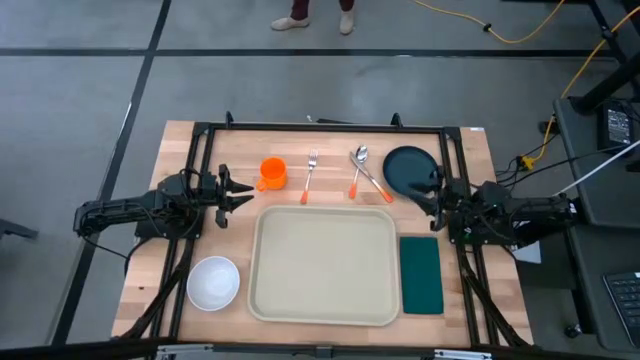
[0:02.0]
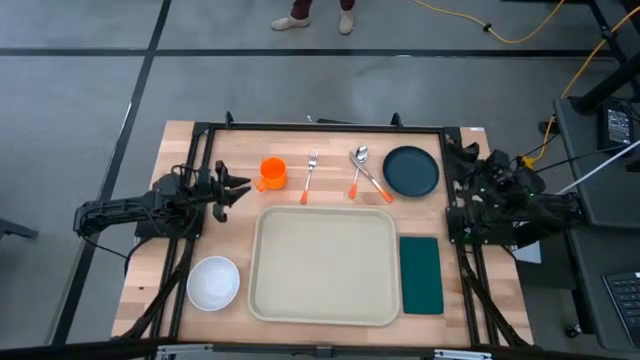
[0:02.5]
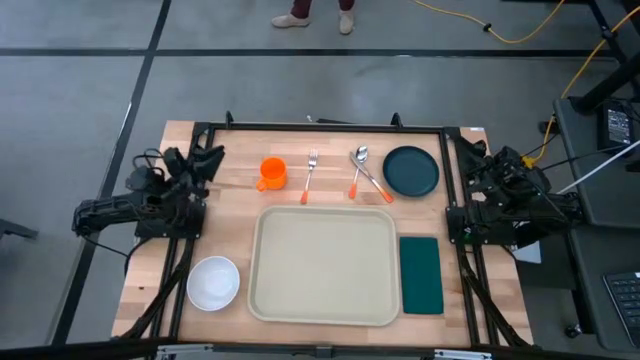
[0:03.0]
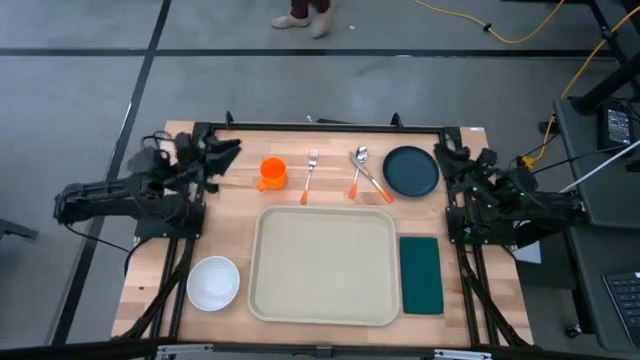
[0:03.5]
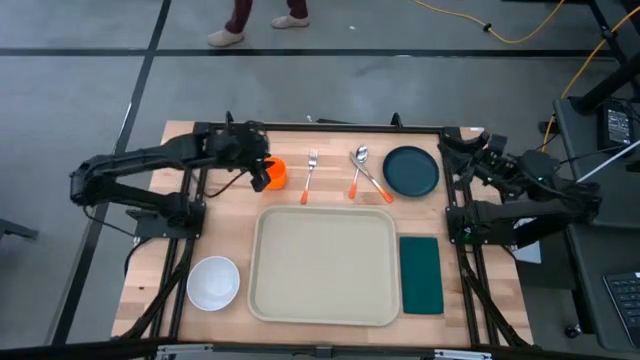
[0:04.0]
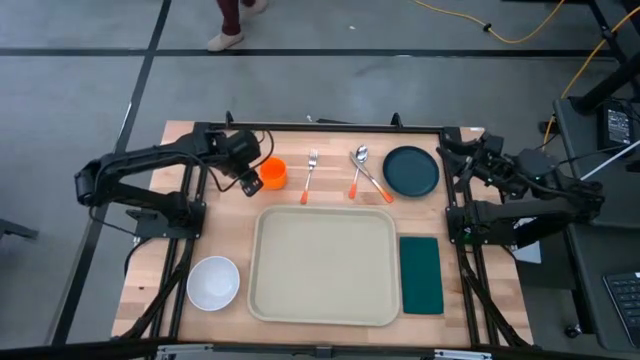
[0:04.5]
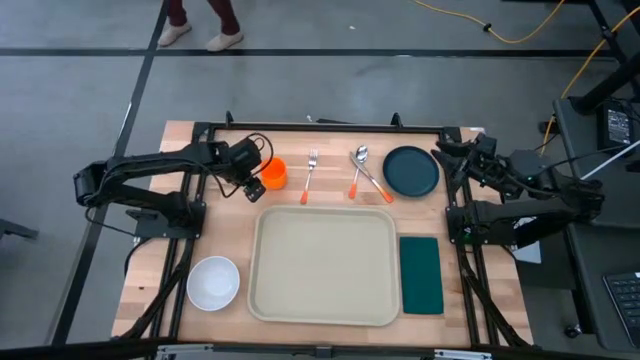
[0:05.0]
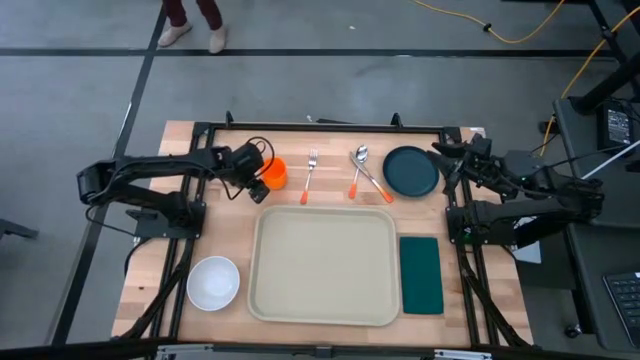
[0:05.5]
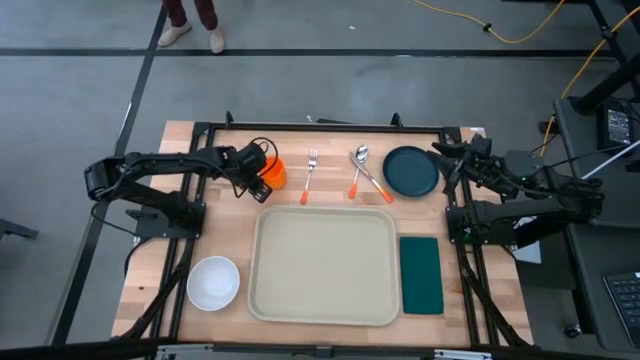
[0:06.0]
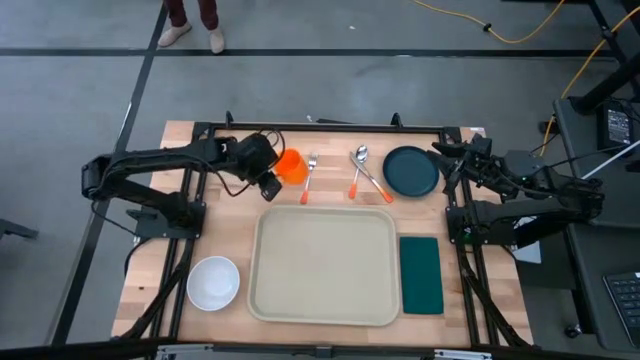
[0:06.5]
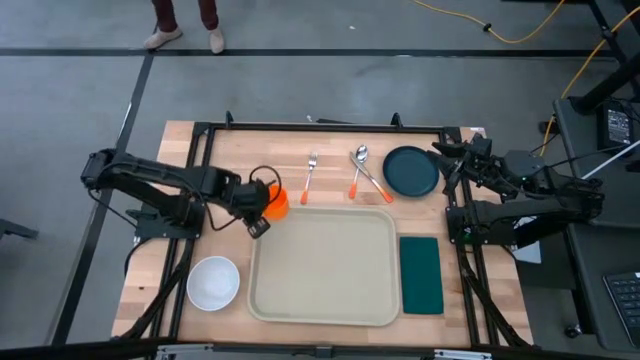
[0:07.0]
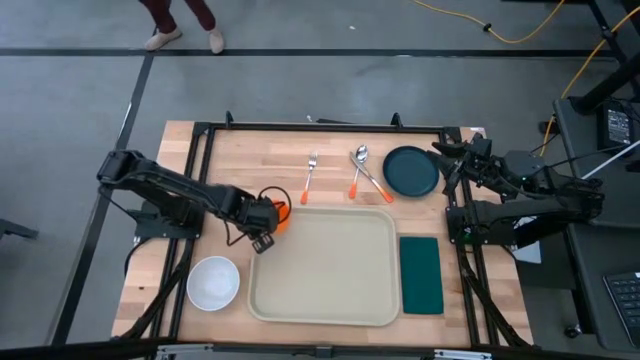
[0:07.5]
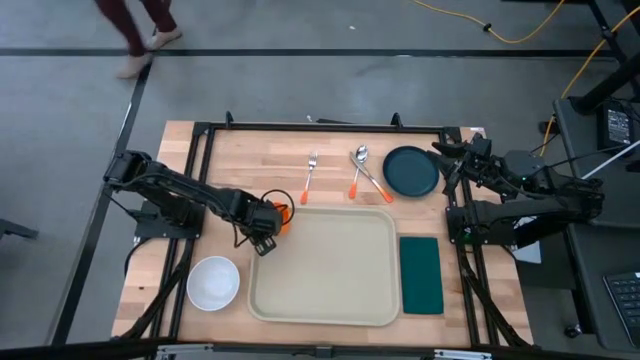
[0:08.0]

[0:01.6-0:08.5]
Task: Set up tray
Put the orange mug on the top left of the brown tray

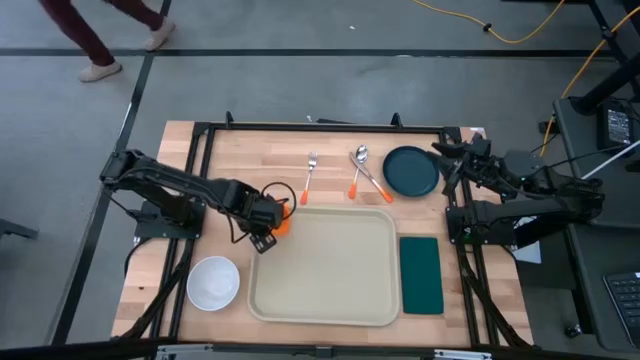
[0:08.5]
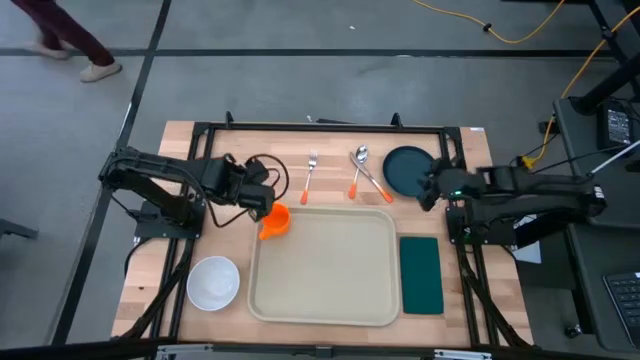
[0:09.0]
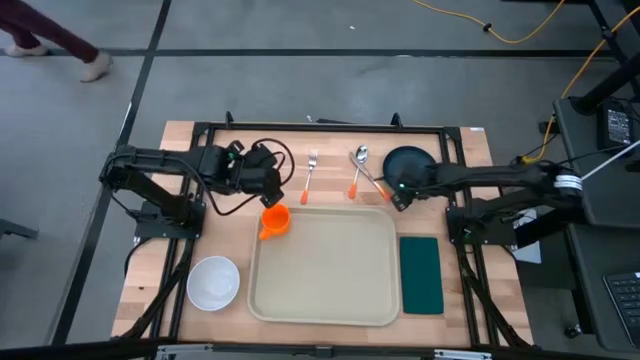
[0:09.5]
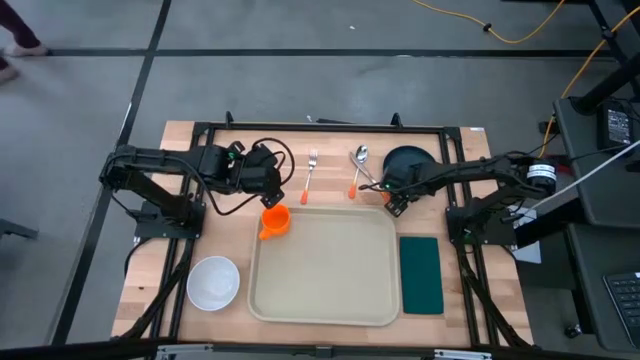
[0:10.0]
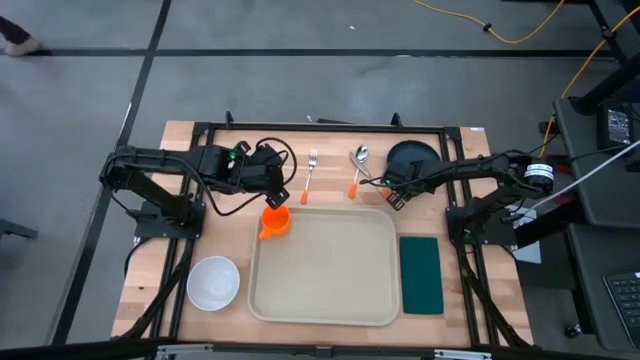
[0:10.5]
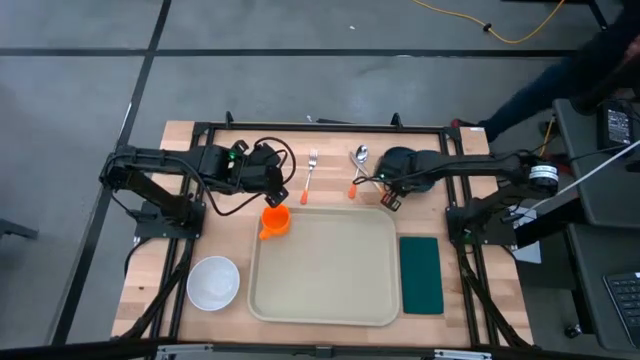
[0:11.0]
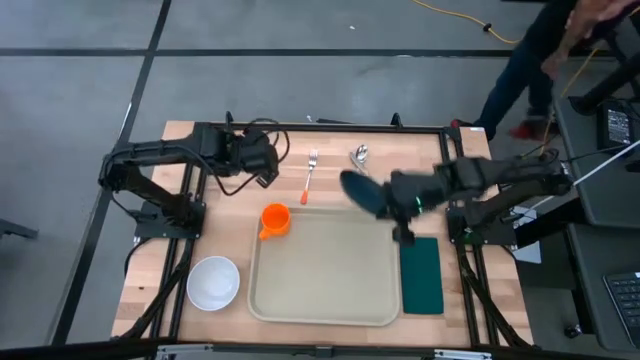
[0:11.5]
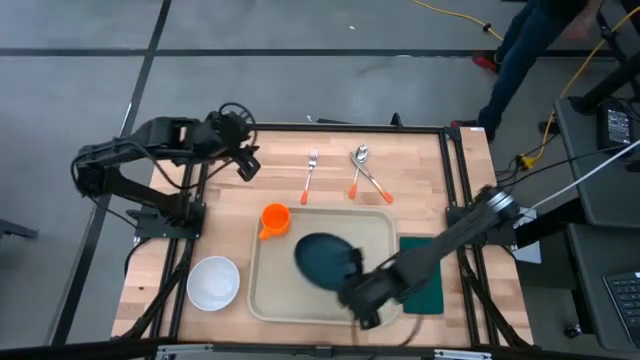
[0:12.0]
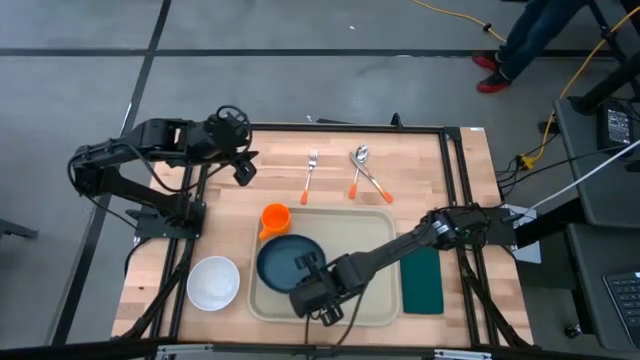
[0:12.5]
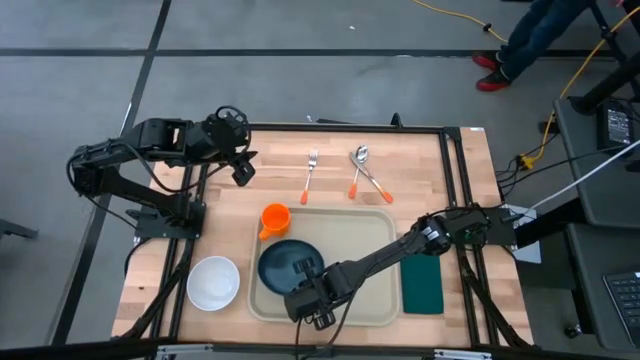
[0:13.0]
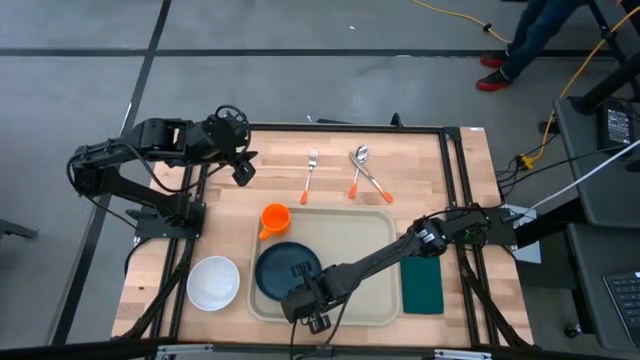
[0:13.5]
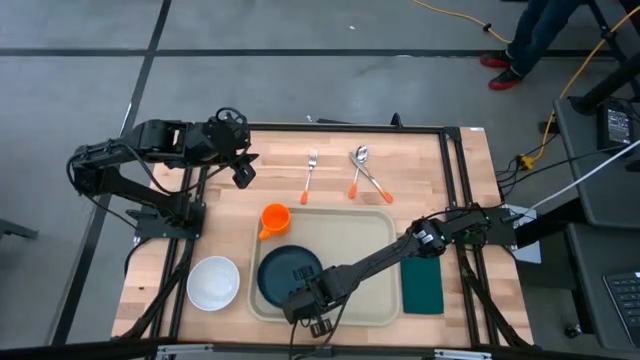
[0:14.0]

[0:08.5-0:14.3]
Put the dark blue plate on the brown tray

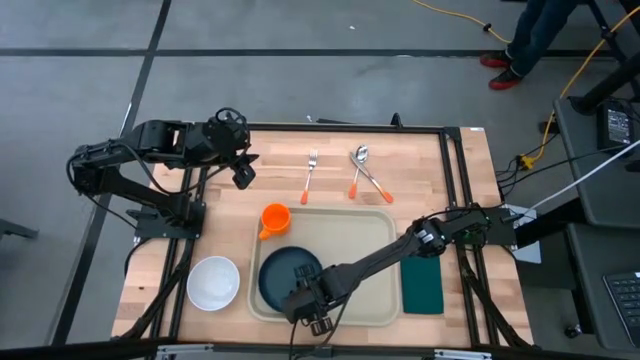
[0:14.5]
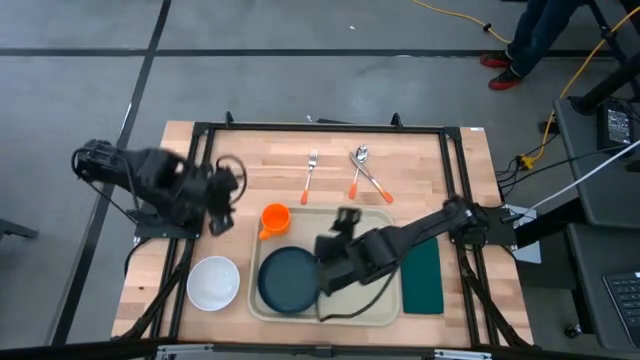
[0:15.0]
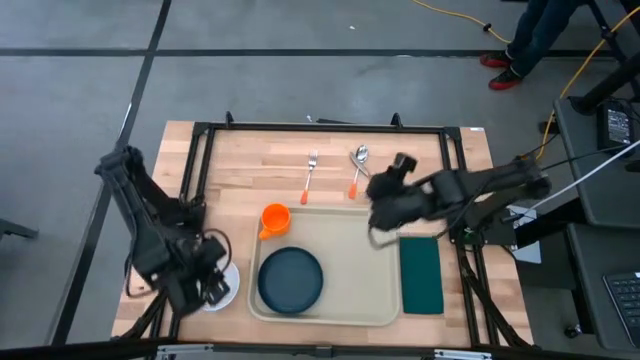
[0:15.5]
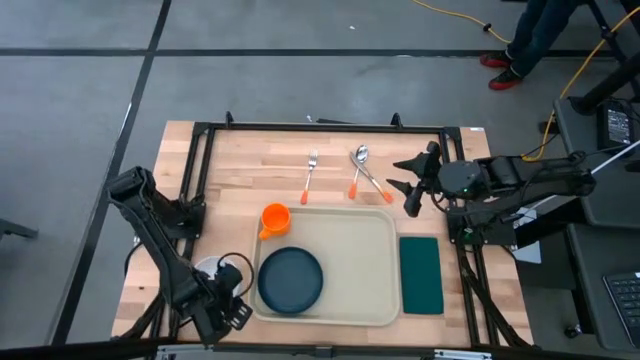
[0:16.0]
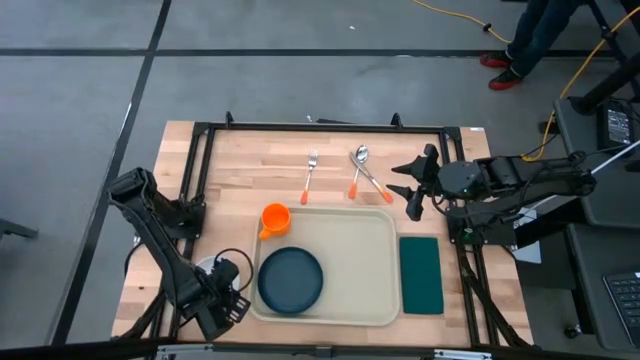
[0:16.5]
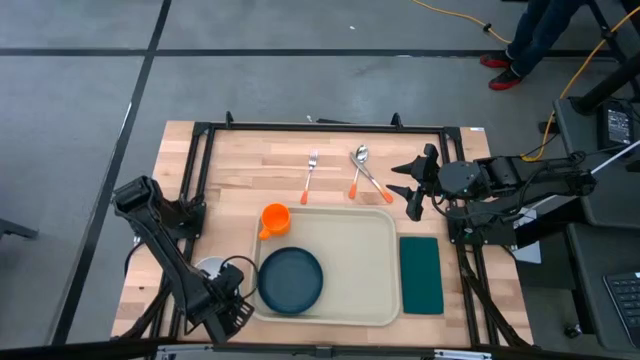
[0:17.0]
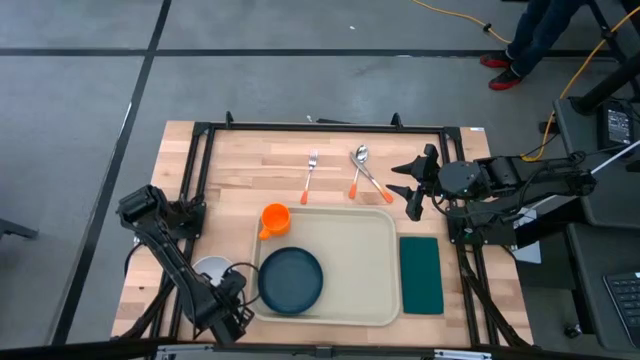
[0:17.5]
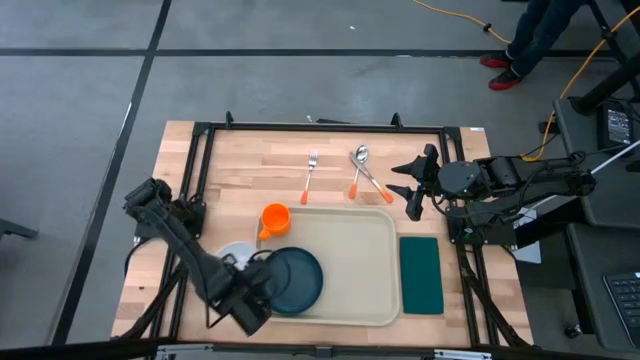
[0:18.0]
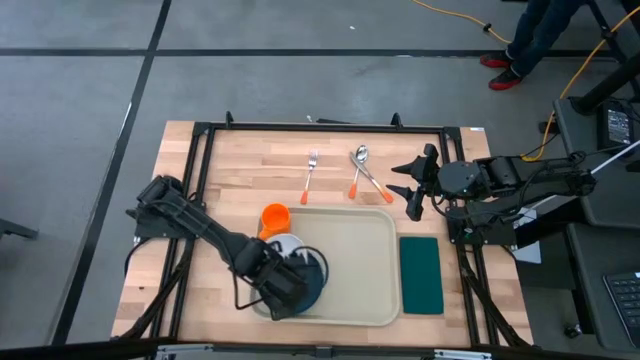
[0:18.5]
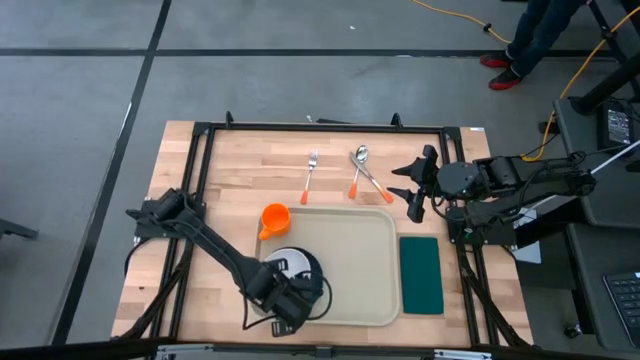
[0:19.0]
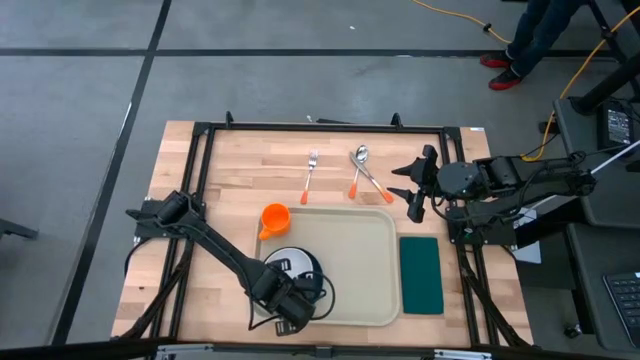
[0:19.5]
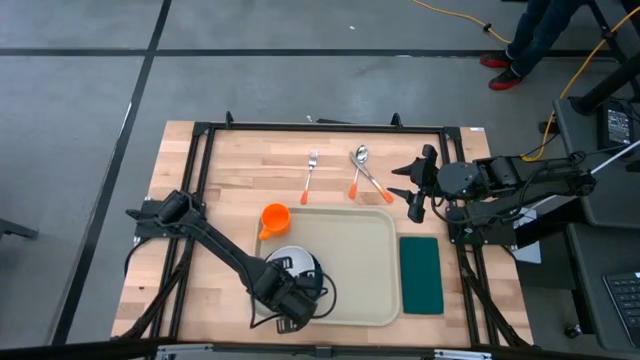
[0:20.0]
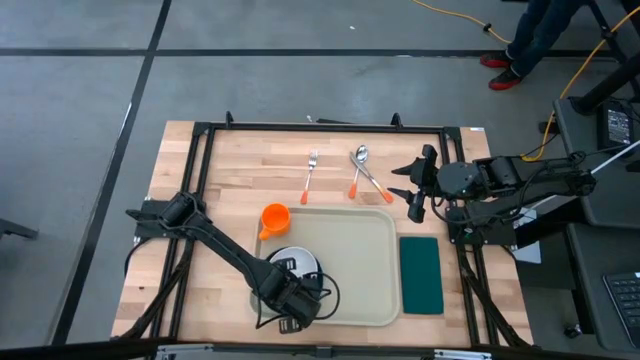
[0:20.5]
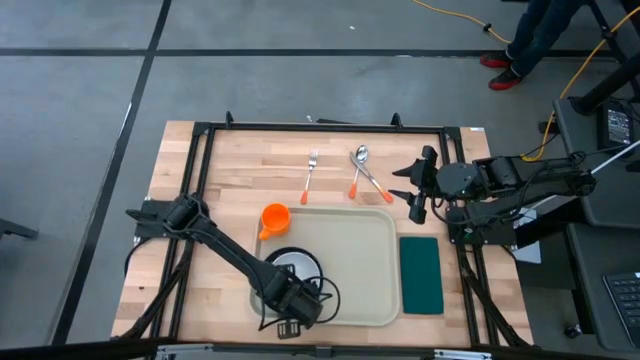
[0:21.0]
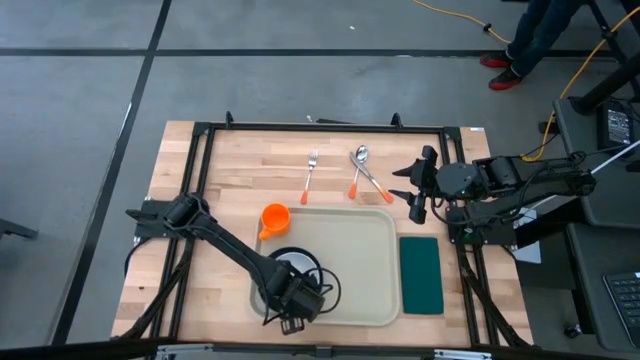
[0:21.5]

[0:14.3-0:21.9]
Put the white bowl on the dark blue plate

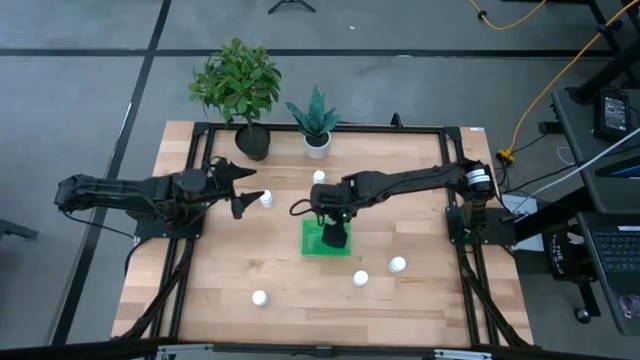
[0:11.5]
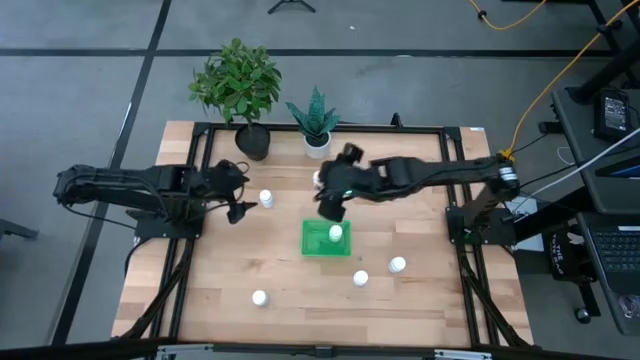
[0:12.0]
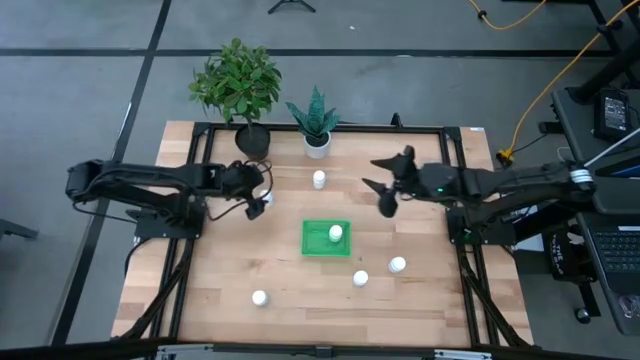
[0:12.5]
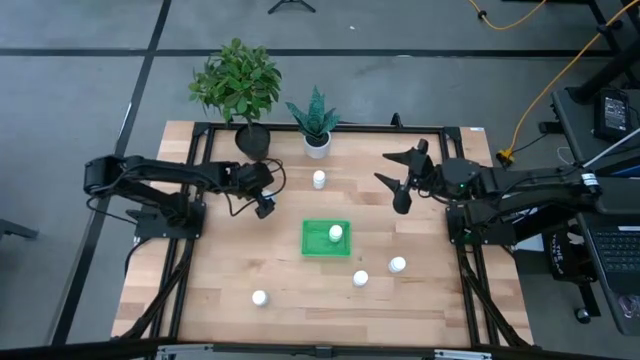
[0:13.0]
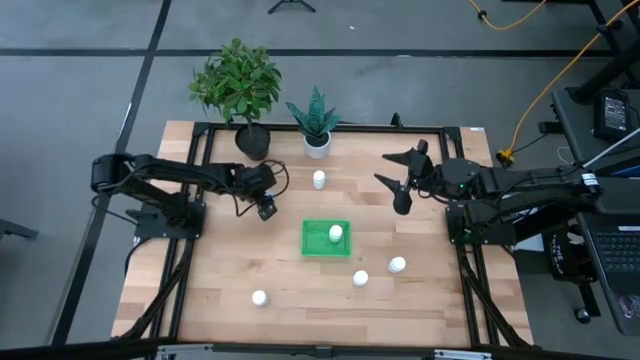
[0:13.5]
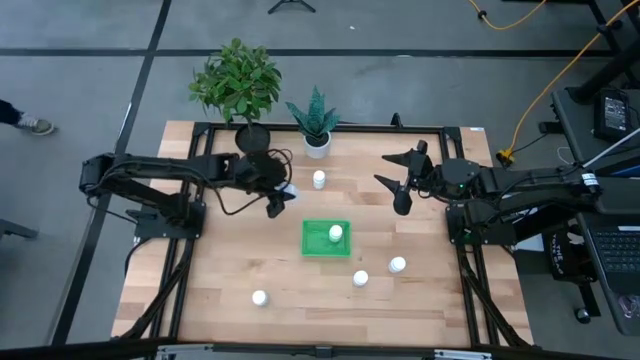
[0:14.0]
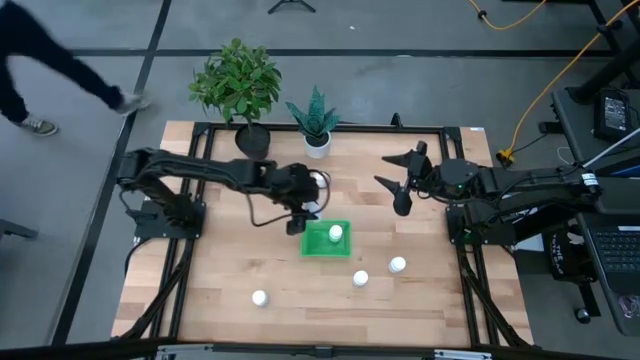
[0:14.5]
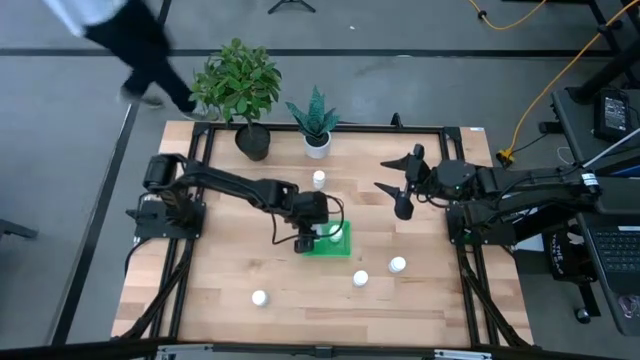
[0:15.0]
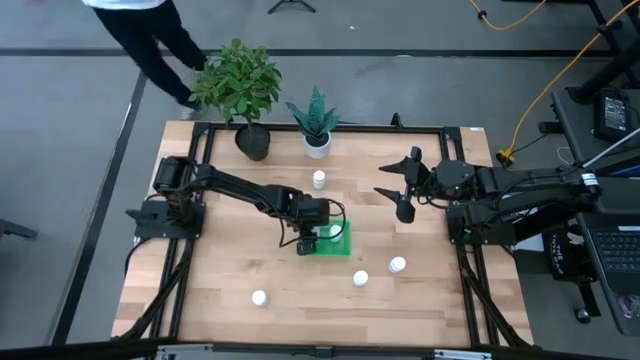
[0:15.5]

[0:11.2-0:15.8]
Task: Pick and place pill bottles into a basket
Put the white pill bottle into the green bin
